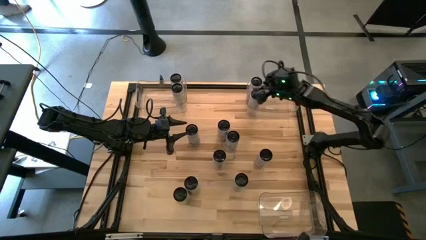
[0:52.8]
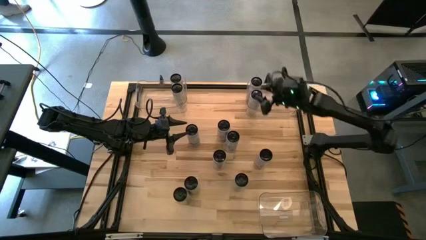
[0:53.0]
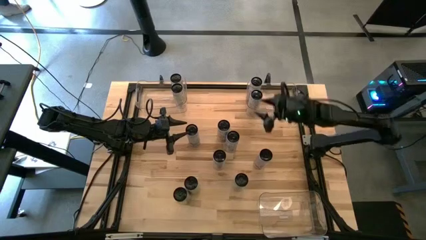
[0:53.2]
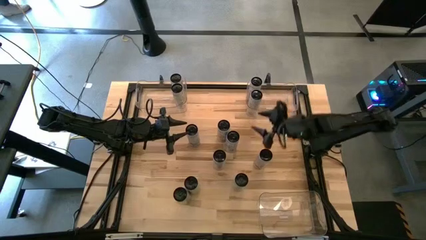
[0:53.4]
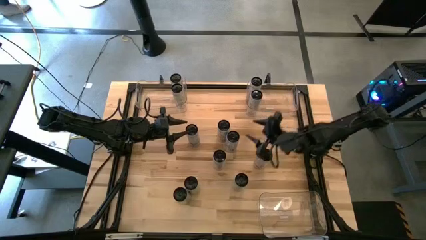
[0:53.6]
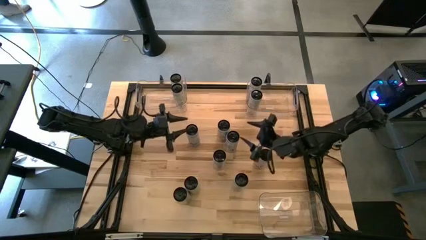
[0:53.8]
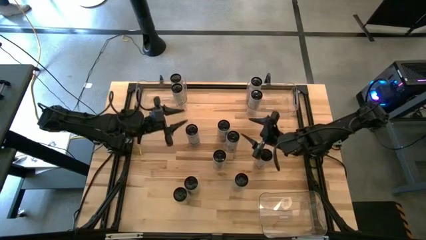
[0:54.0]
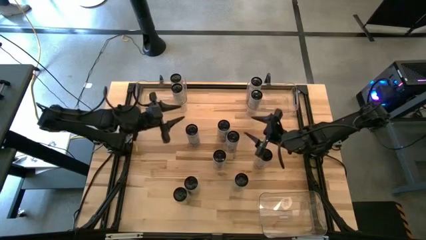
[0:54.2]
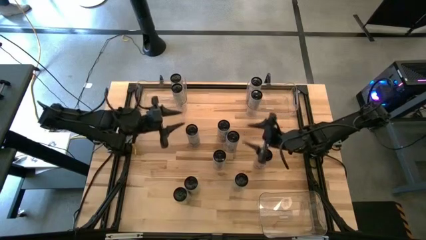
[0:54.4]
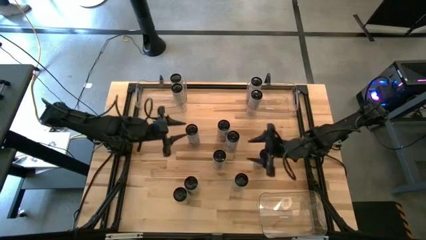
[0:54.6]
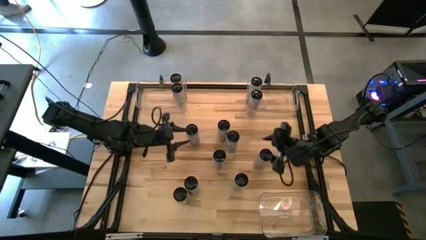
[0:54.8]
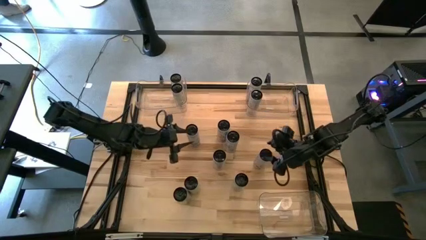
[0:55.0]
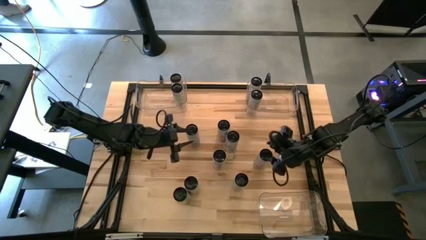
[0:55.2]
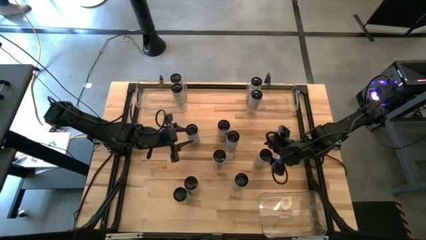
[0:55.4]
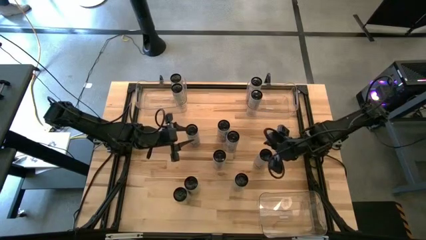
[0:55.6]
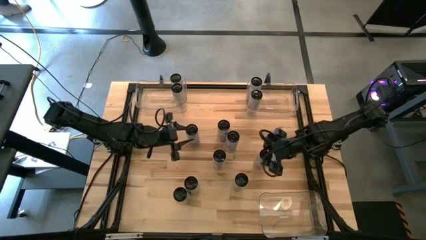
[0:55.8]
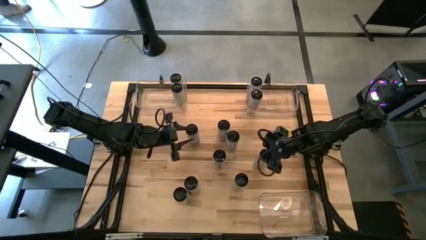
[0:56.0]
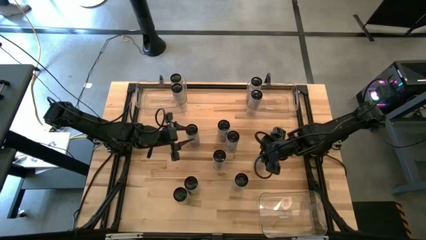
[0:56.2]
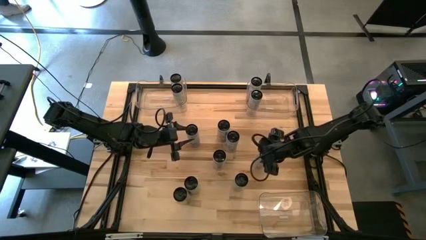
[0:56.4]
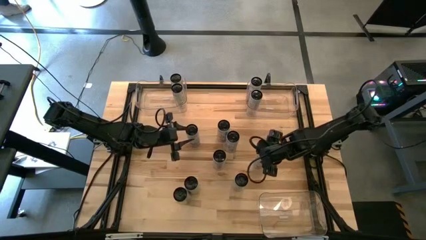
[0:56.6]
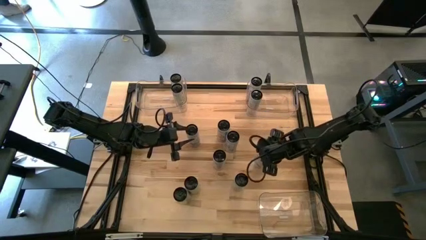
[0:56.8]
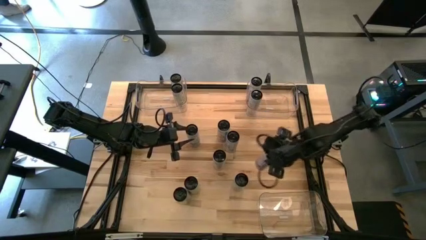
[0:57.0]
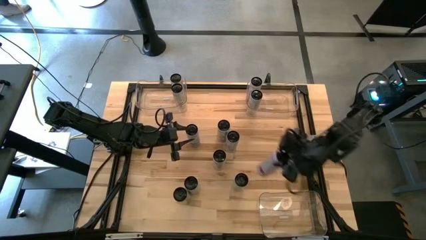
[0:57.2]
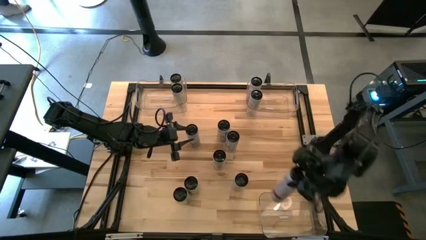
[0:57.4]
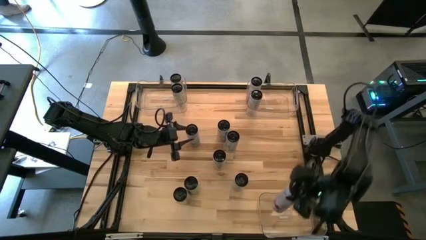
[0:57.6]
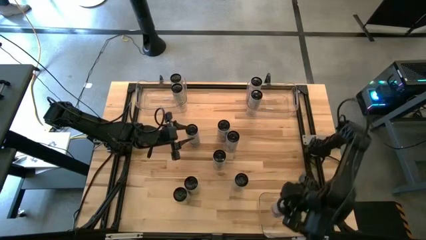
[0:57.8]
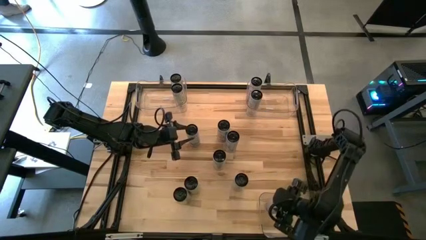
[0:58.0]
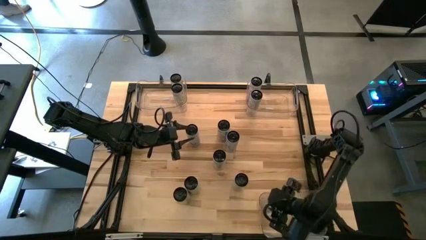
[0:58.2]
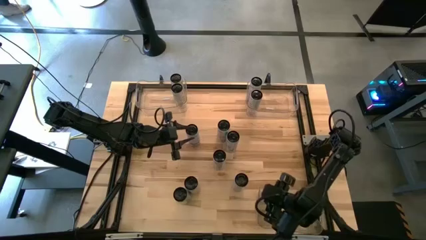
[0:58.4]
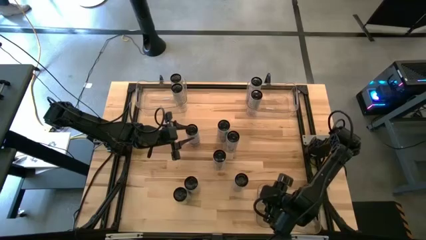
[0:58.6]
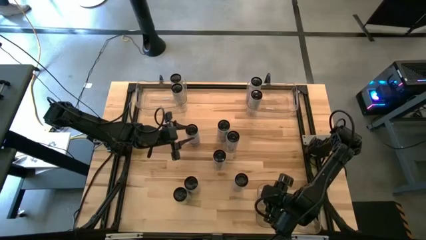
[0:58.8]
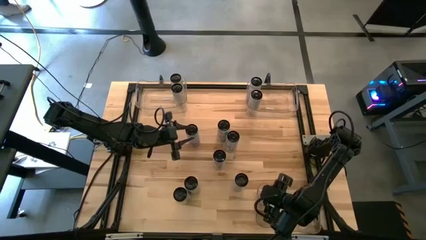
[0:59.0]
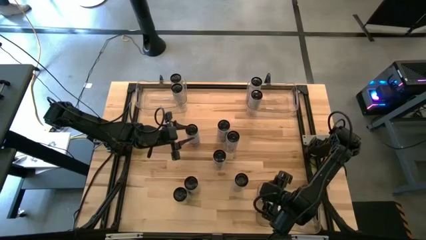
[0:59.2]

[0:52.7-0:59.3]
Task: Sort soda cans
Put the white-pink soda can into the bottom transparent bin

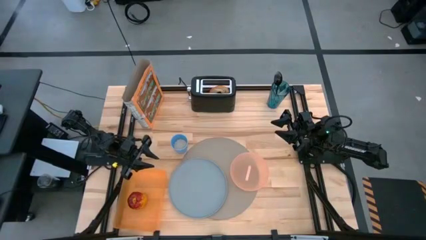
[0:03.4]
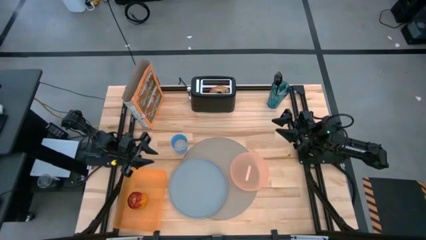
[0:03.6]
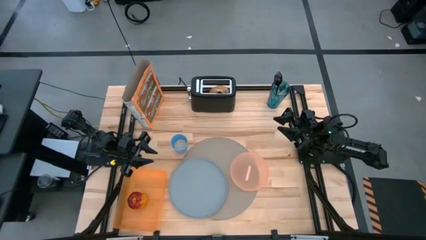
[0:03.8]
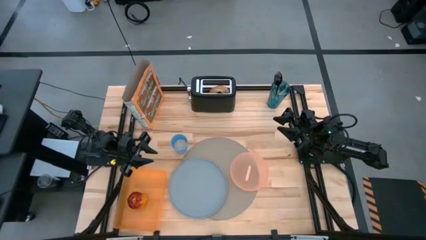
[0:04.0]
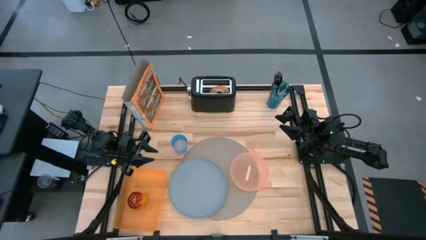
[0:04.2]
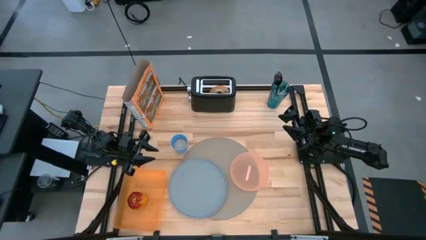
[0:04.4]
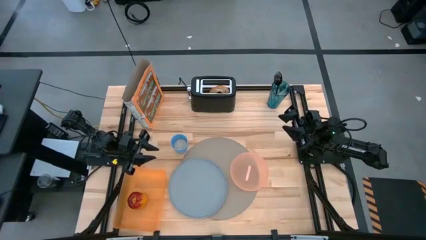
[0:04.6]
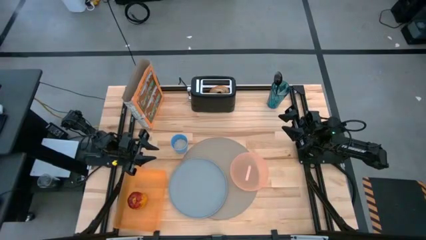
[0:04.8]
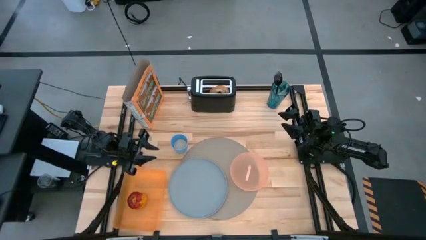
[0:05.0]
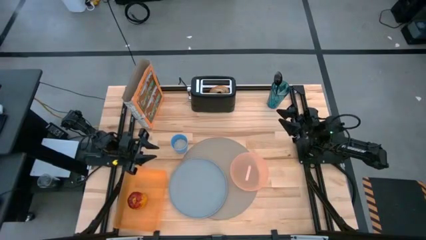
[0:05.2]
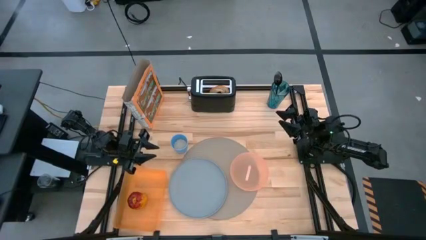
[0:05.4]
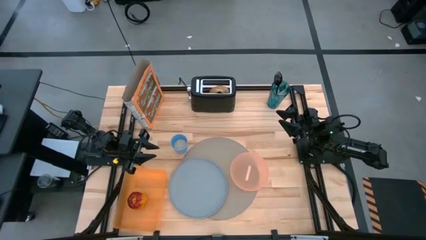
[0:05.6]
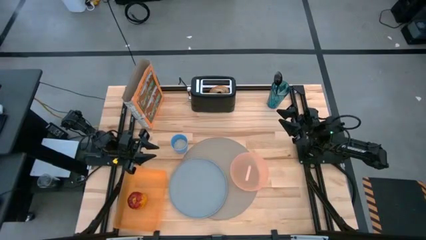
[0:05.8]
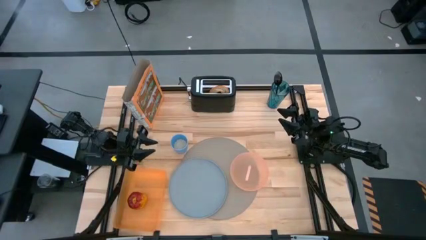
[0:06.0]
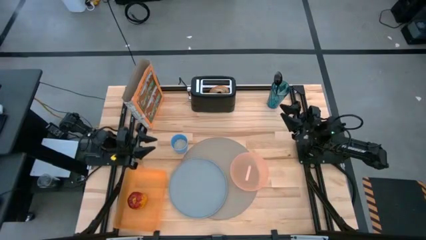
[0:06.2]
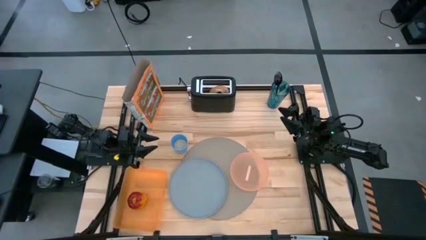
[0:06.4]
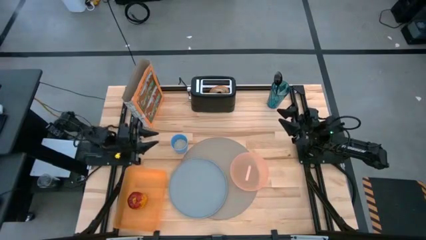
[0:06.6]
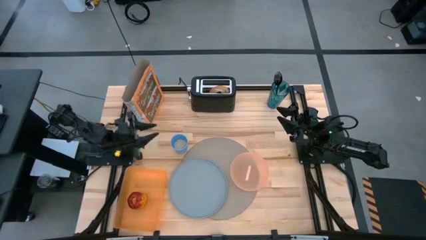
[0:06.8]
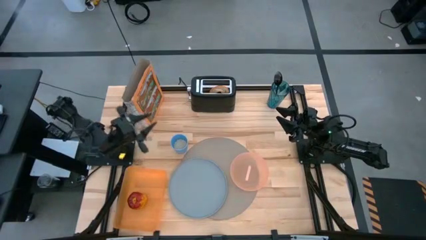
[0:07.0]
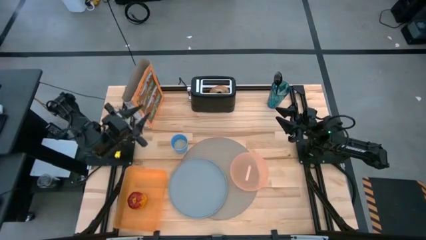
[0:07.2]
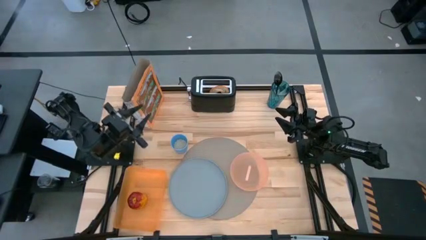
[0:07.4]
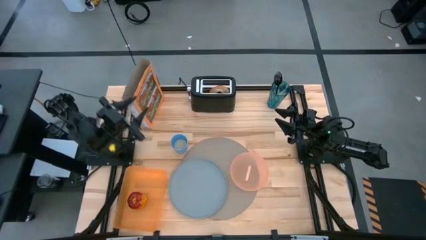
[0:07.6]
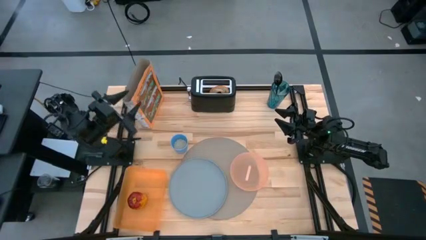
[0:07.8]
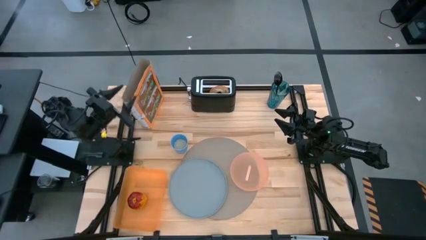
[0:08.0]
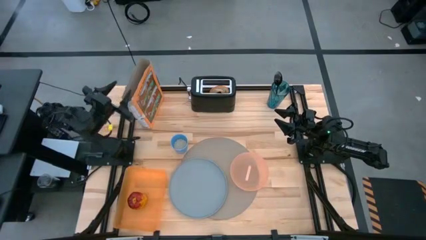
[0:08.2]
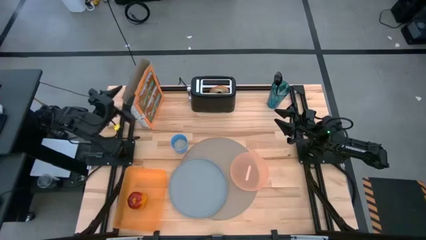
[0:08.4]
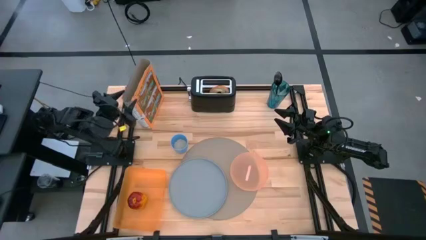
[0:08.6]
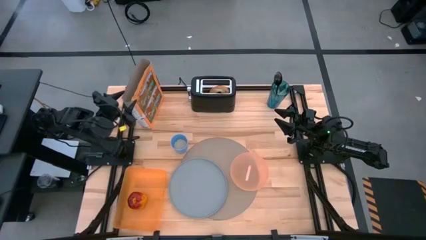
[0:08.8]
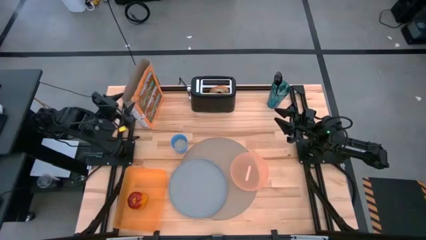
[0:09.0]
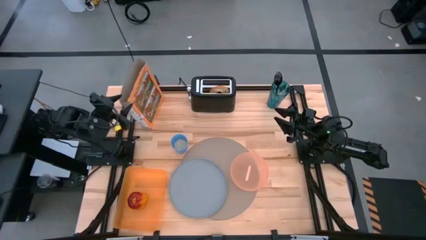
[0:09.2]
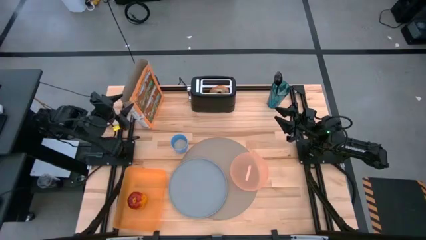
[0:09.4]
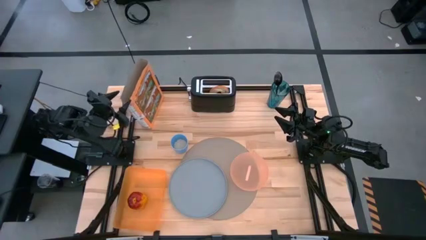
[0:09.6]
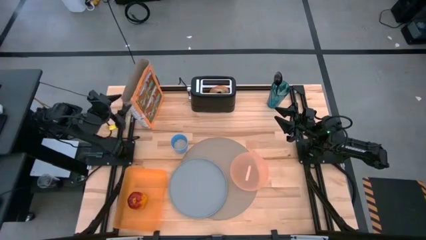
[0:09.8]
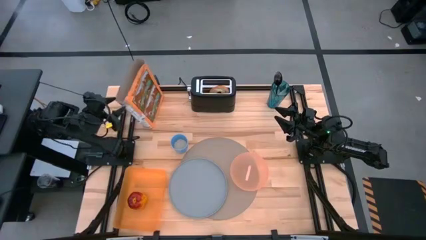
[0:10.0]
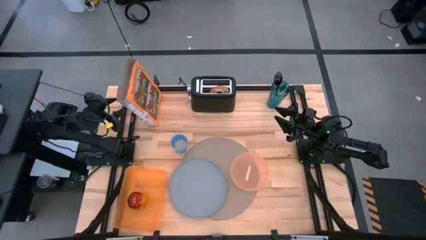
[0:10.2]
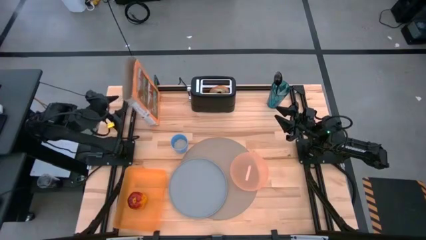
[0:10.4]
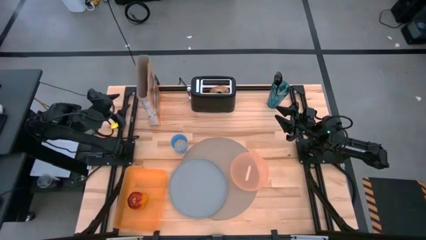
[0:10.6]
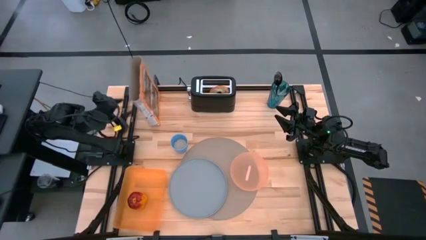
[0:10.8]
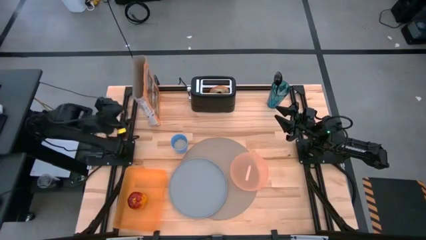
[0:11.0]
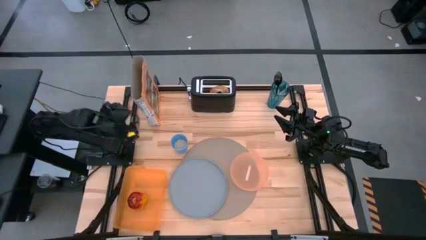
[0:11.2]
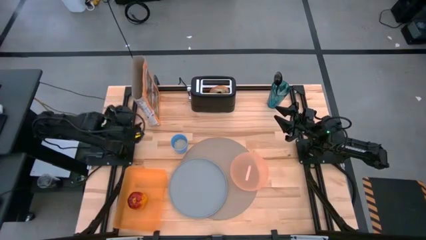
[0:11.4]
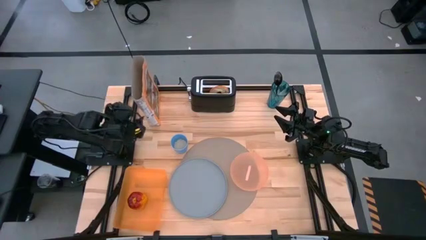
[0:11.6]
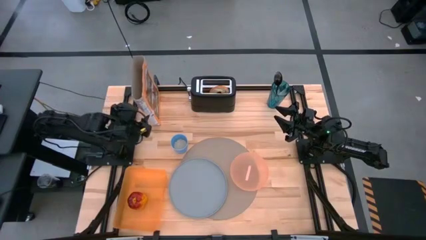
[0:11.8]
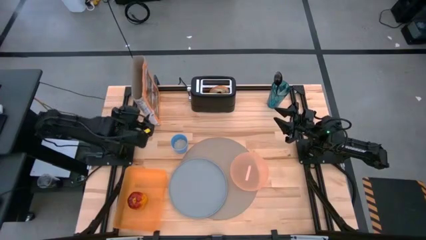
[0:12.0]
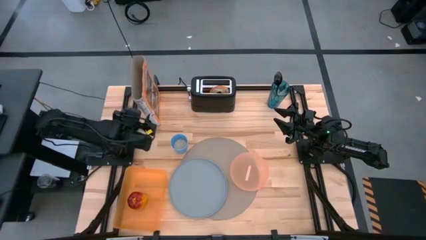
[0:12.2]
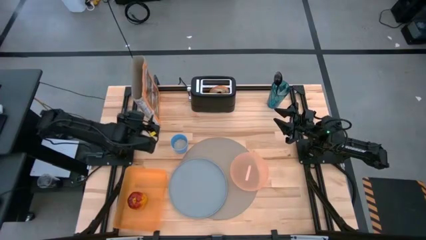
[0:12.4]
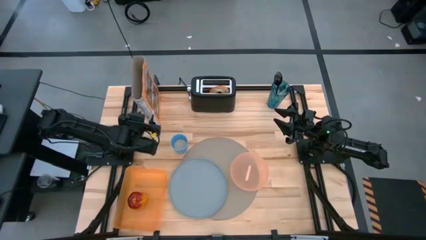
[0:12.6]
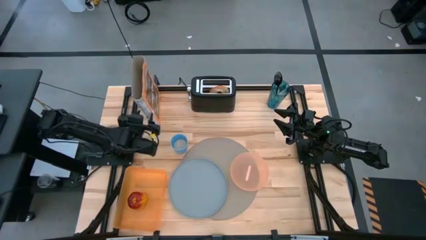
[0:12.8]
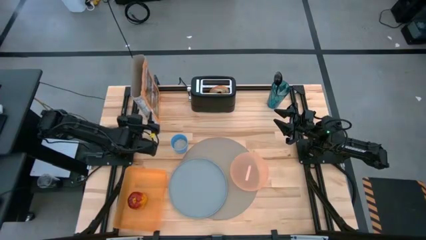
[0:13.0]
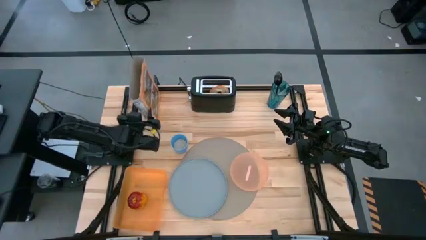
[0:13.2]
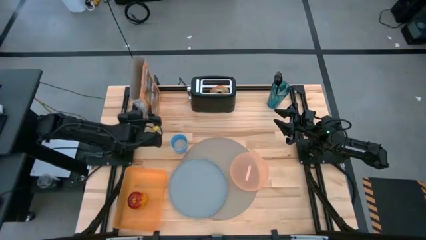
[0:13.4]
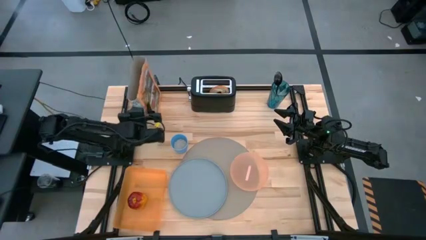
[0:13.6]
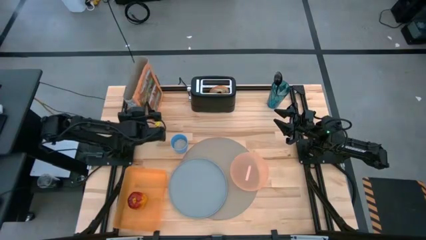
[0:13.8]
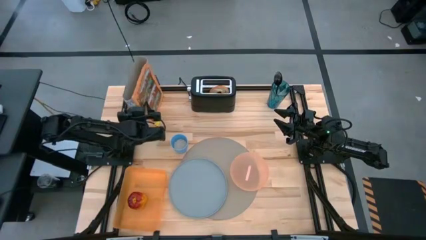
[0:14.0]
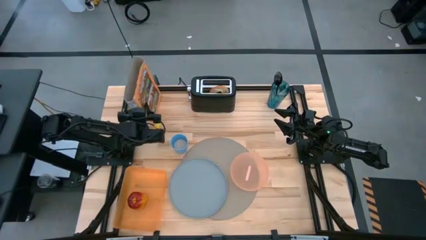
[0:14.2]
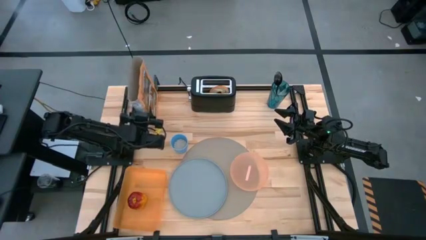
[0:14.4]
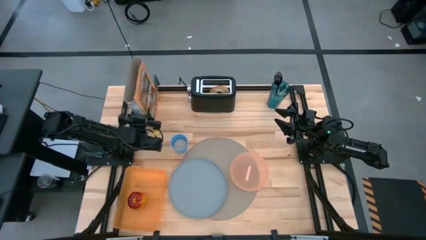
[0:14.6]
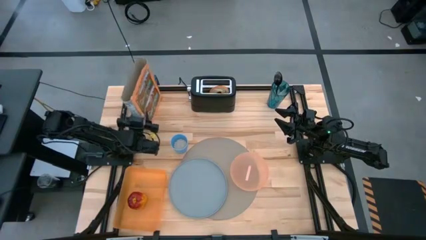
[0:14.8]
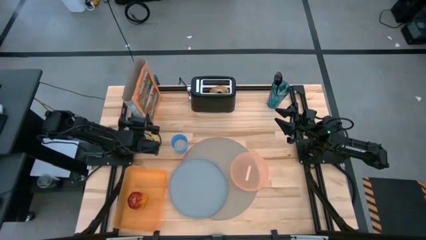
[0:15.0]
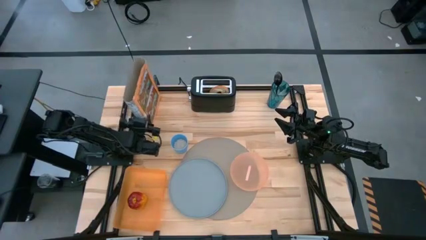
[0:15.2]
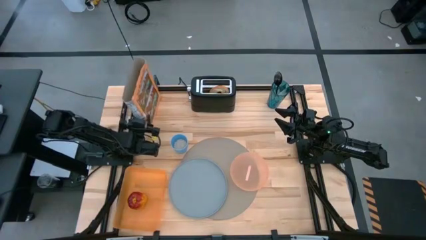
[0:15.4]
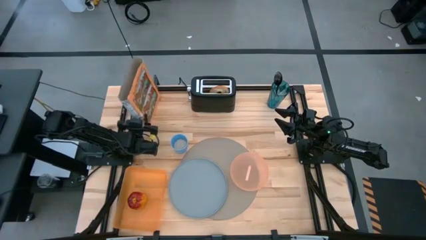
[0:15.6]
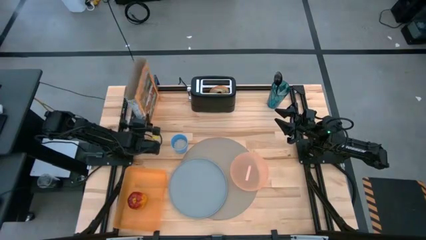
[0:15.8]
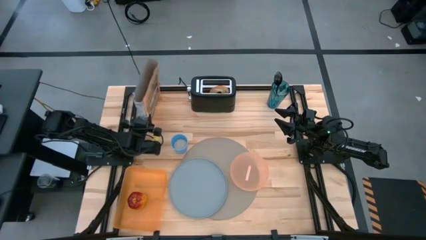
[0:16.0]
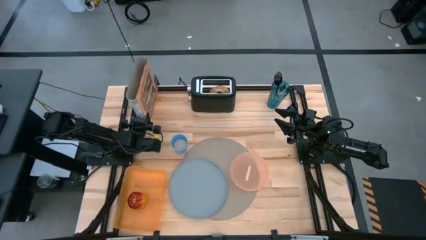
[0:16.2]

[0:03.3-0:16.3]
Task: Arrange a breakfast setting
Pour the cereal from the cereal box into the light orange bowl
